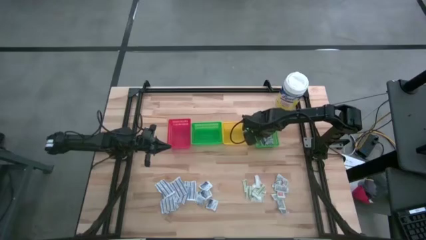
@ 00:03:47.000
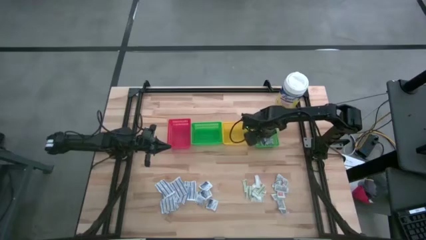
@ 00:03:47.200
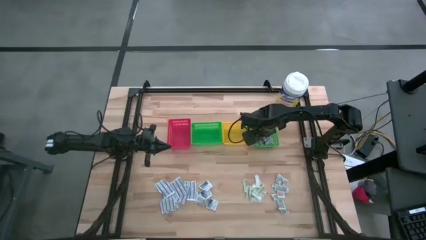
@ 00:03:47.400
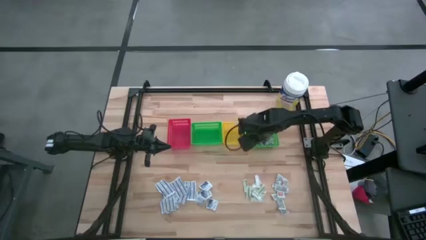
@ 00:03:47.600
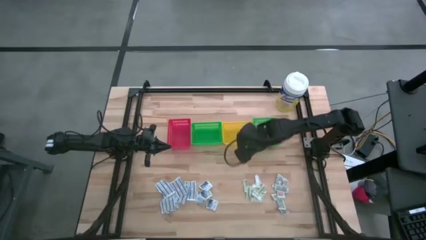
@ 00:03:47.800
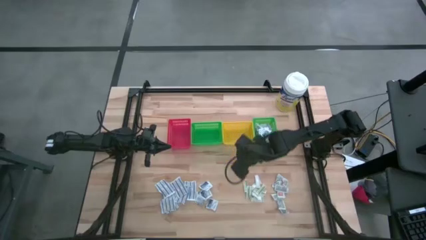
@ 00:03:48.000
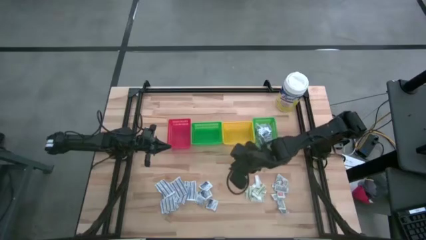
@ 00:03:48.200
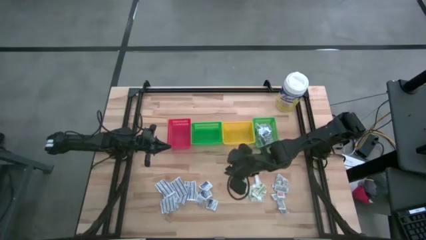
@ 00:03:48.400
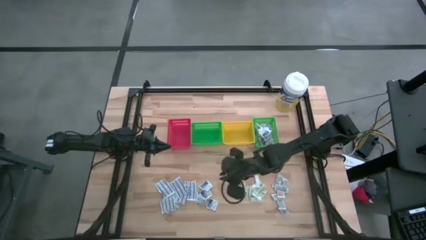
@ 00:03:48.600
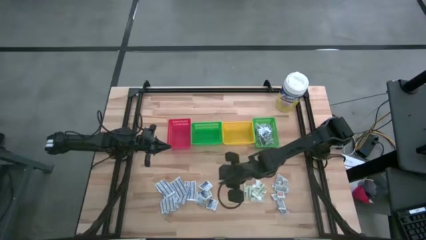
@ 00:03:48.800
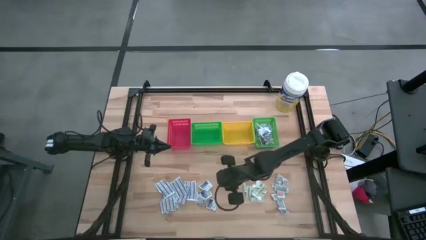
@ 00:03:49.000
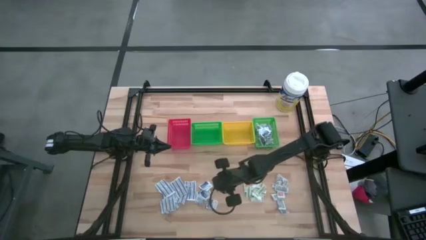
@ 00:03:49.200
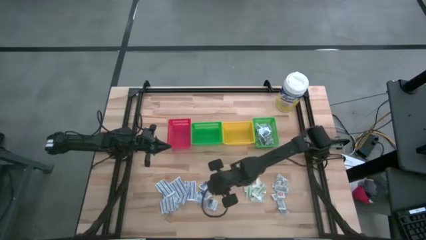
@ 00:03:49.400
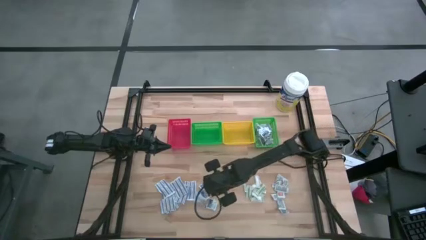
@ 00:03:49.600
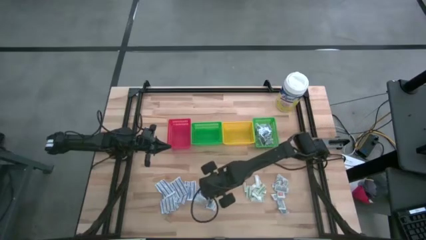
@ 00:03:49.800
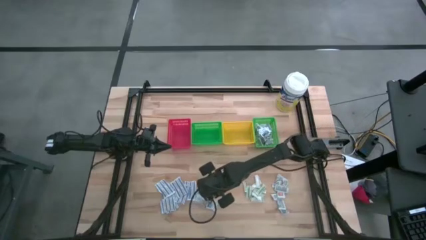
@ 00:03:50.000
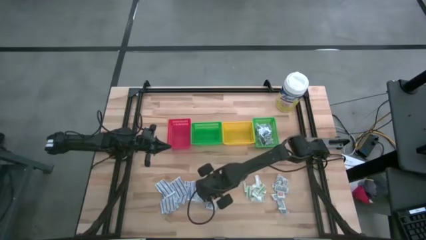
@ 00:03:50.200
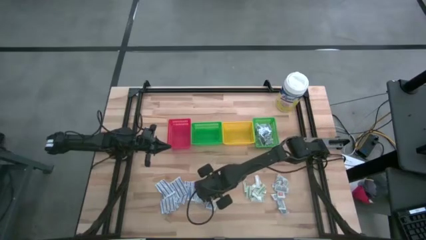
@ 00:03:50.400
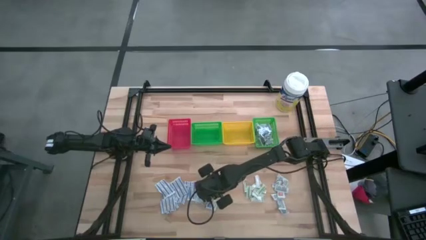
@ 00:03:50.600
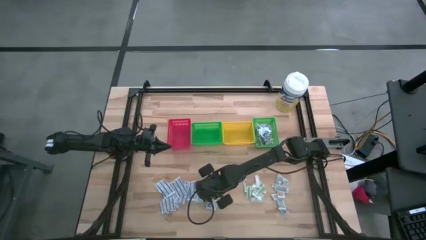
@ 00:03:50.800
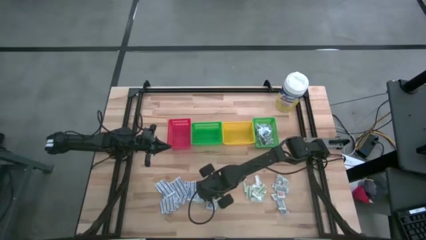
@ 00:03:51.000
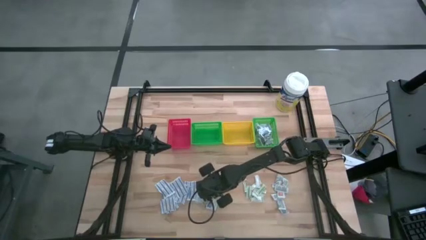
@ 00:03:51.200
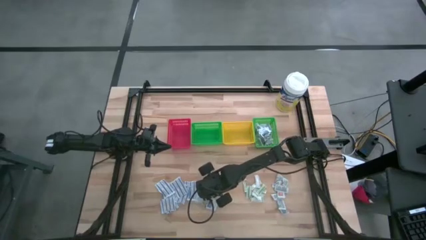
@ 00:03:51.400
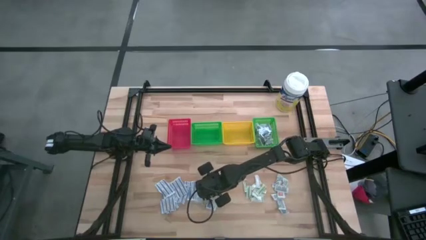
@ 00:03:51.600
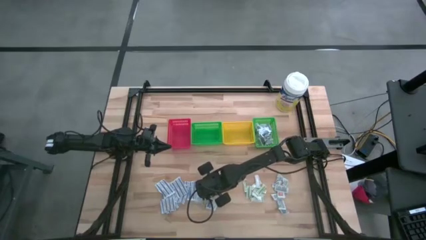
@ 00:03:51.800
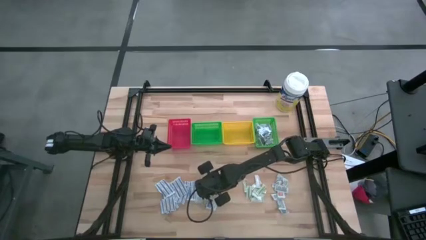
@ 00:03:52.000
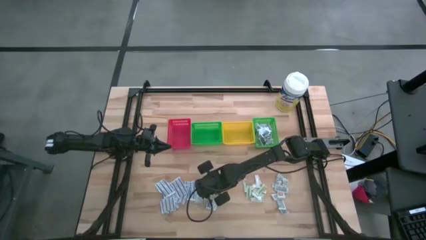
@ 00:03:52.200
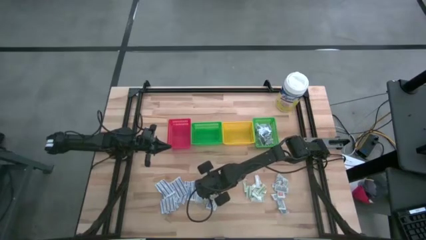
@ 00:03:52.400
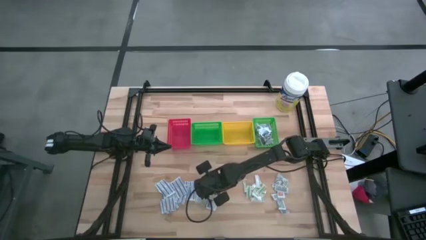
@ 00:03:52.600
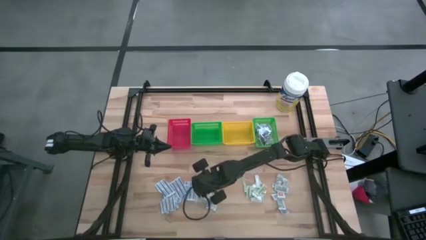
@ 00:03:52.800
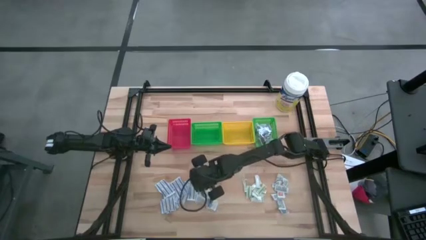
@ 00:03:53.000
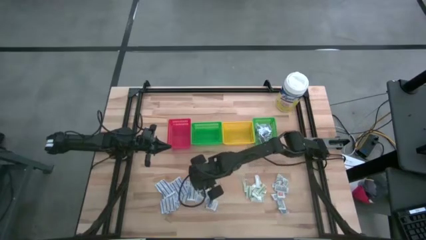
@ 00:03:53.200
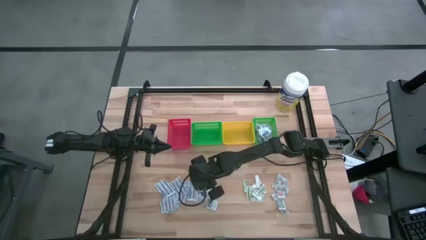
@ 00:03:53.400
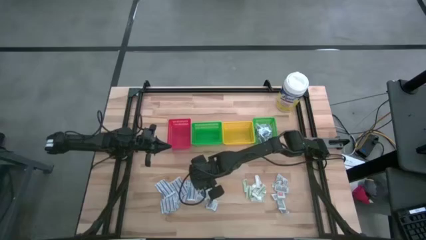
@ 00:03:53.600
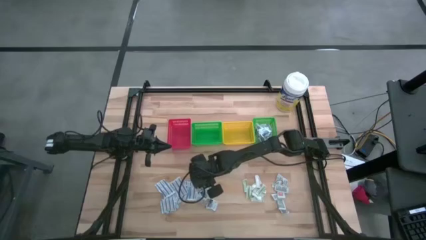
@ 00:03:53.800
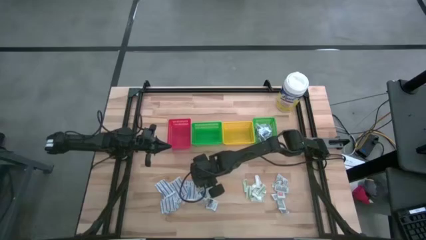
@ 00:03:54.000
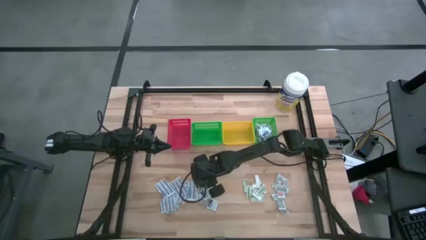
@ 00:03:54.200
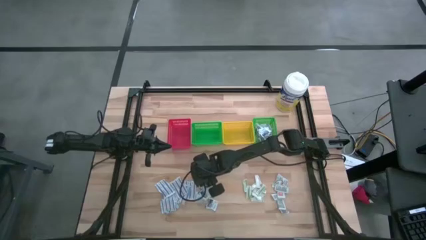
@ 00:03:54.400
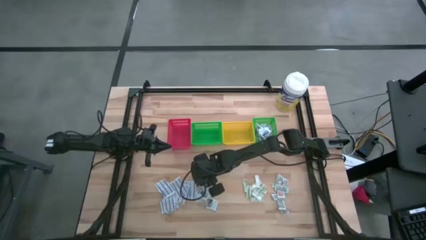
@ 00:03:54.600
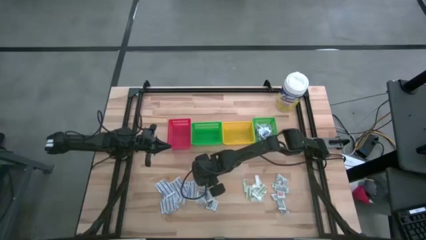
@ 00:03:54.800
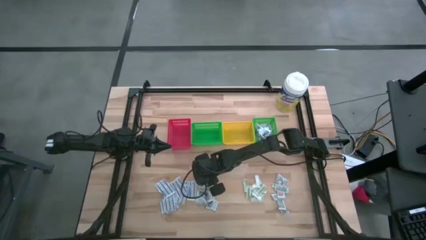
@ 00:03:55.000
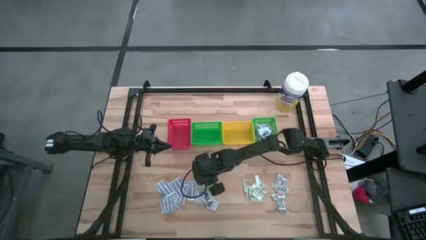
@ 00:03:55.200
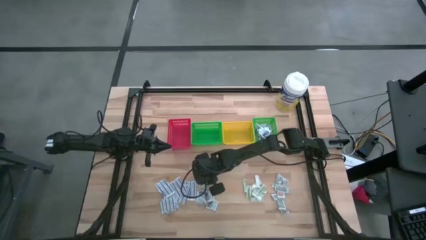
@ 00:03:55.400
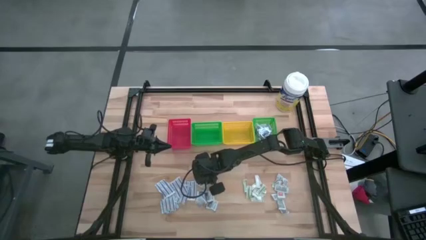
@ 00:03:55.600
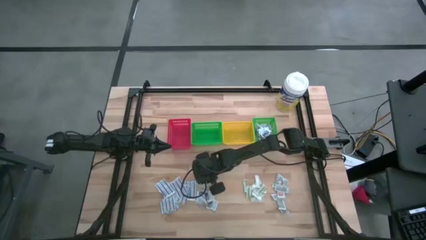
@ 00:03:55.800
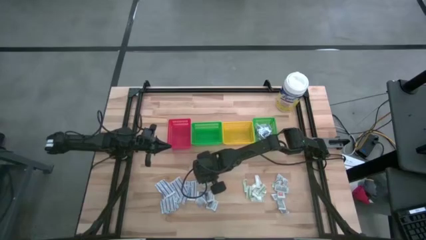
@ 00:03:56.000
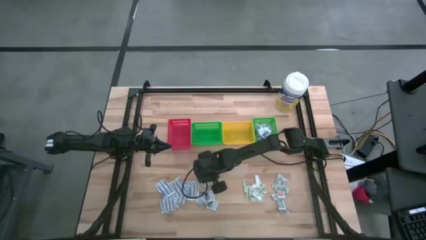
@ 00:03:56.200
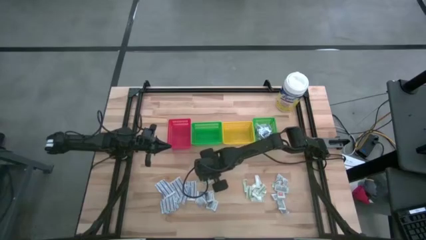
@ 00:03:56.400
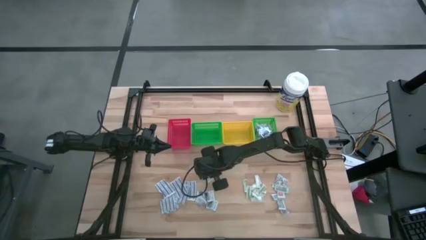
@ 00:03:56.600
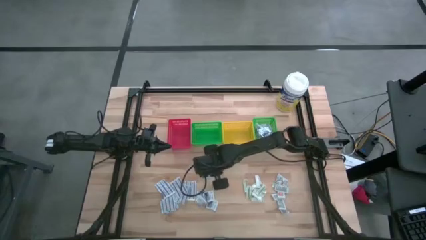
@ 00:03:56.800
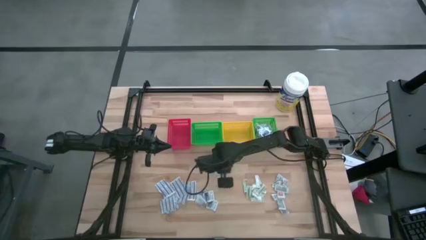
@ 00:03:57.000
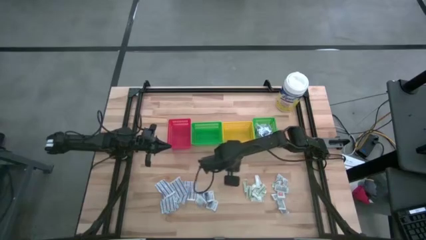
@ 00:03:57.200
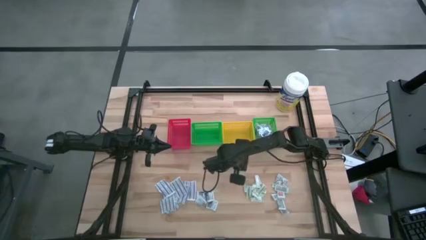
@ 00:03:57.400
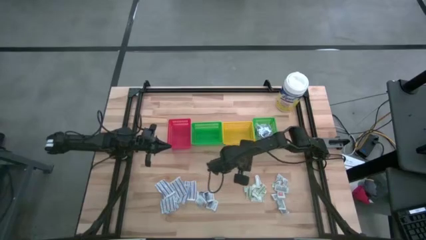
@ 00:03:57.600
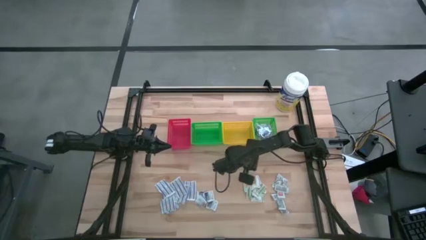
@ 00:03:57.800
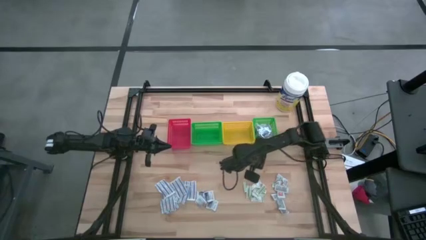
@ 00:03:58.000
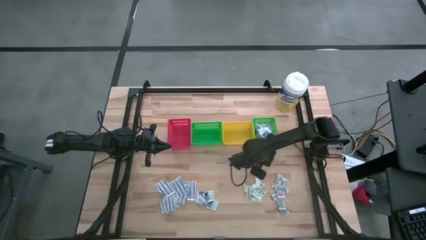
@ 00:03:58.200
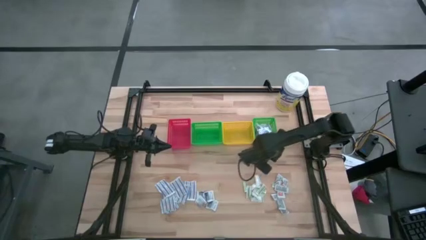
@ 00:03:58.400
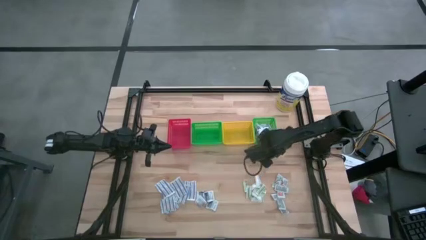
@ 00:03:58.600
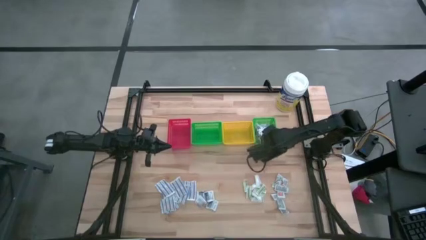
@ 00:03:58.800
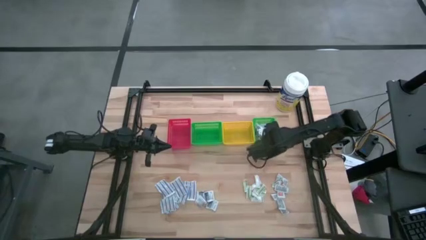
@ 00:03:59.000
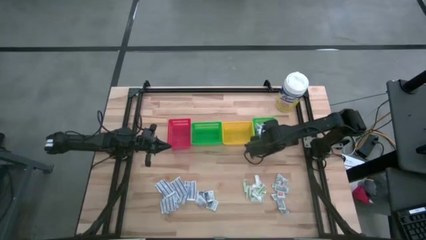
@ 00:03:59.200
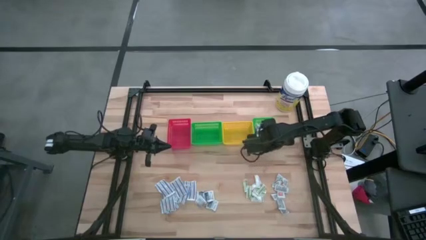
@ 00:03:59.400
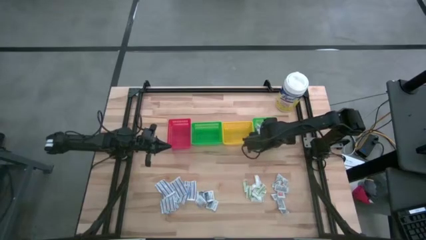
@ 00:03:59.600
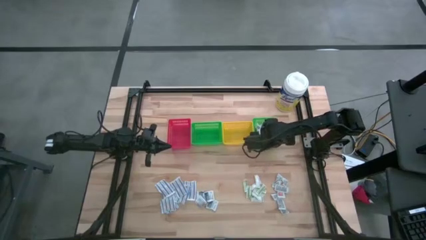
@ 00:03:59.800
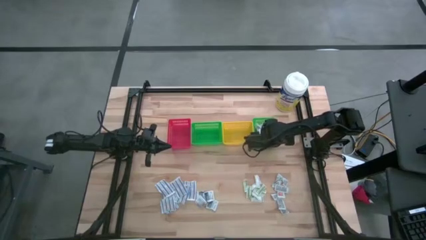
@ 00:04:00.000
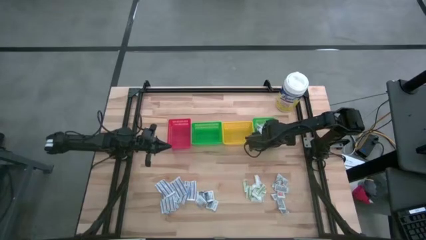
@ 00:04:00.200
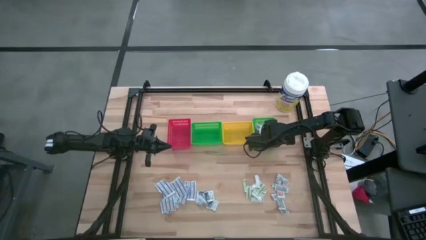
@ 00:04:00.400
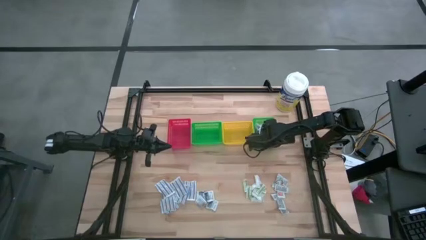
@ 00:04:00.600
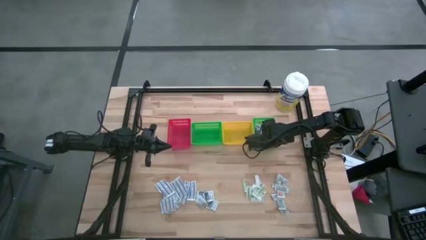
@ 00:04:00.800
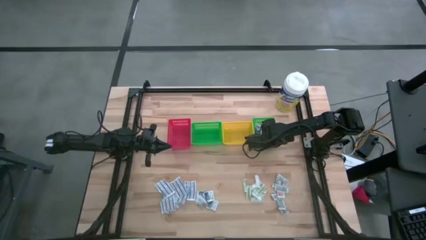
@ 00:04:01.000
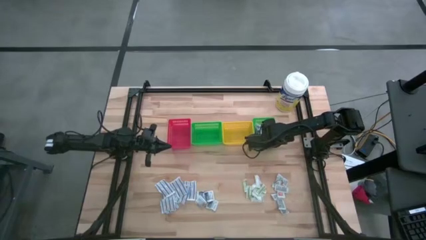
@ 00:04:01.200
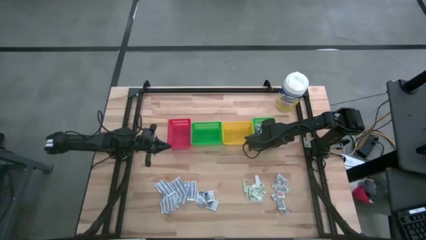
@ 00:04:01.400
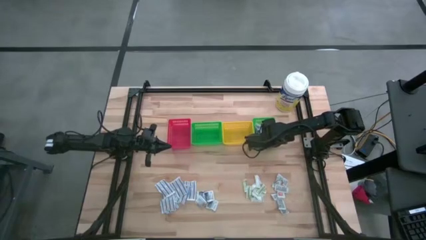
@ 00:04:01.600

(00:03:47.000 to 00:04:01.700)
Task: Pick & Place First Aid Supplies
Put the blue alcohol pad into the right green bin
